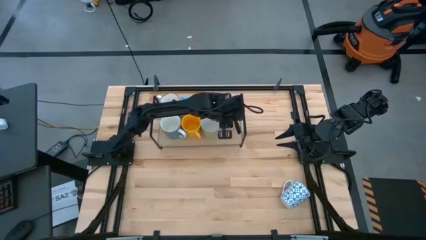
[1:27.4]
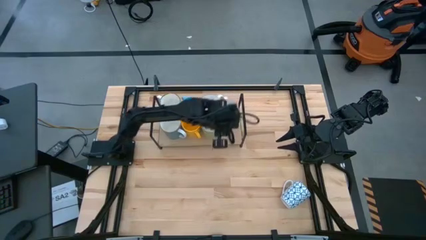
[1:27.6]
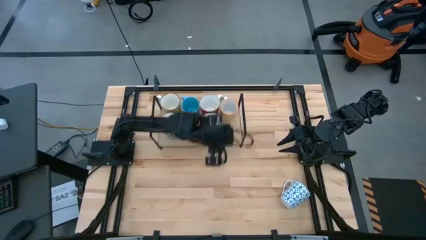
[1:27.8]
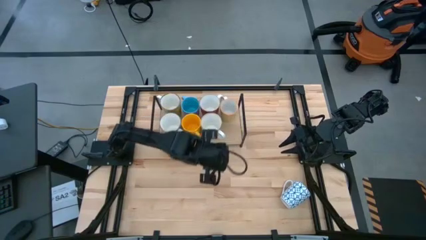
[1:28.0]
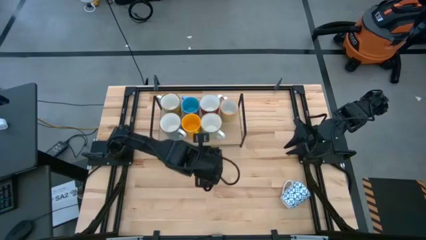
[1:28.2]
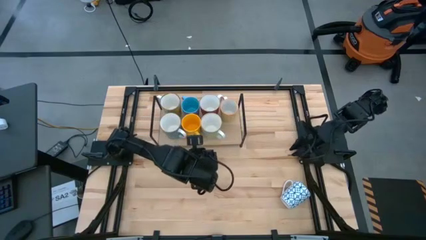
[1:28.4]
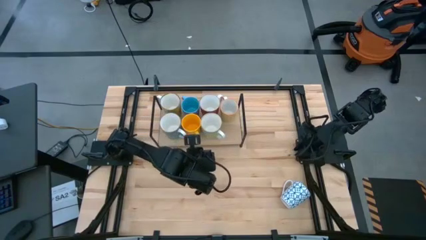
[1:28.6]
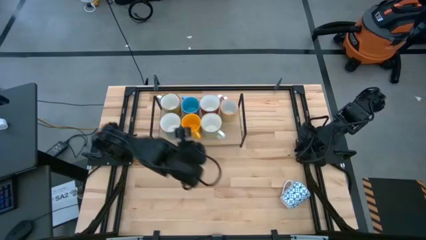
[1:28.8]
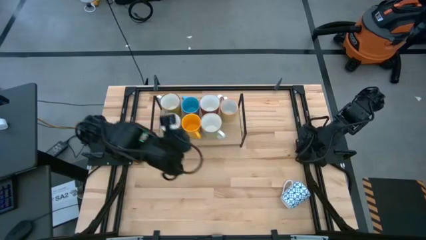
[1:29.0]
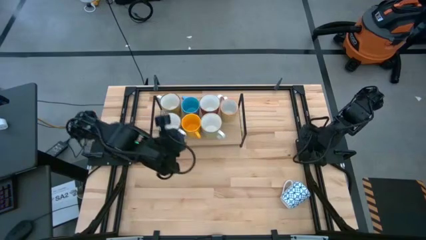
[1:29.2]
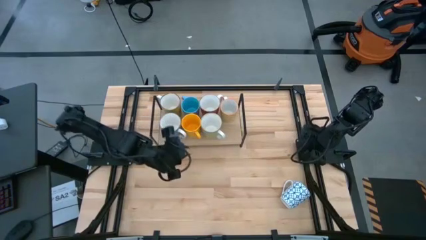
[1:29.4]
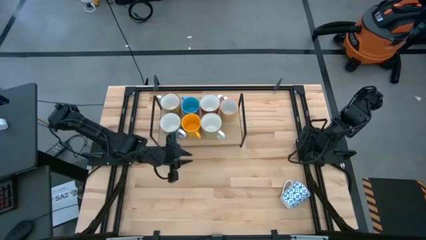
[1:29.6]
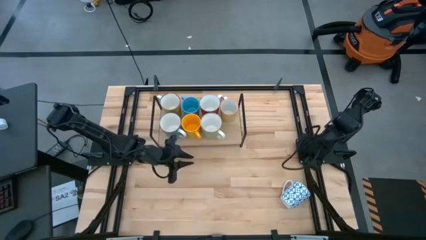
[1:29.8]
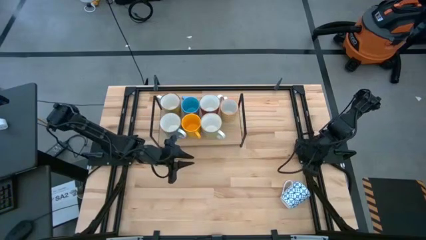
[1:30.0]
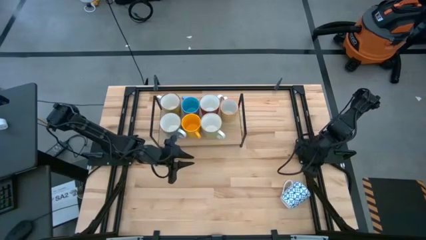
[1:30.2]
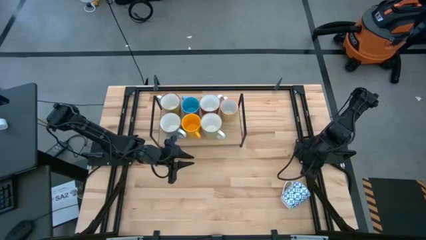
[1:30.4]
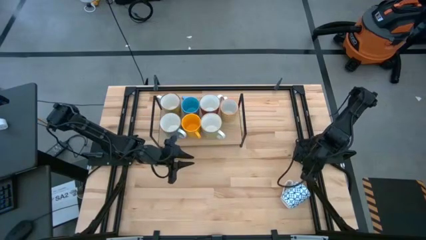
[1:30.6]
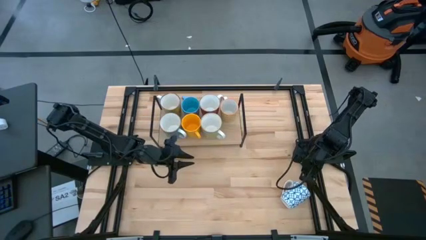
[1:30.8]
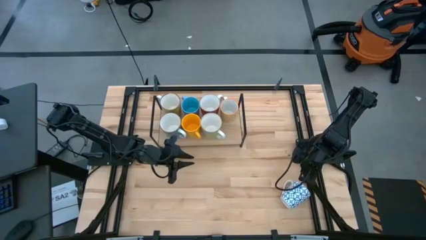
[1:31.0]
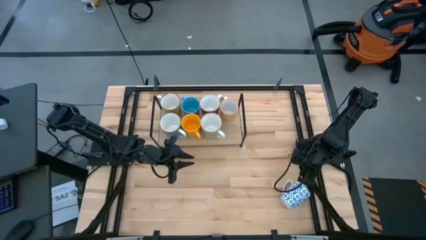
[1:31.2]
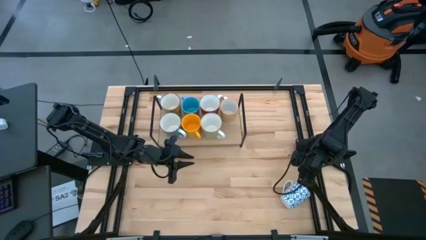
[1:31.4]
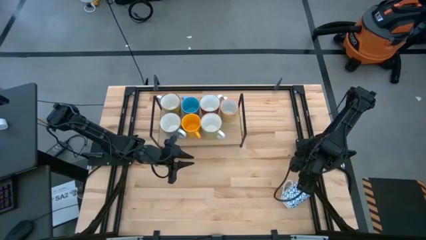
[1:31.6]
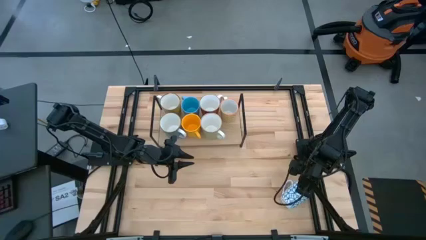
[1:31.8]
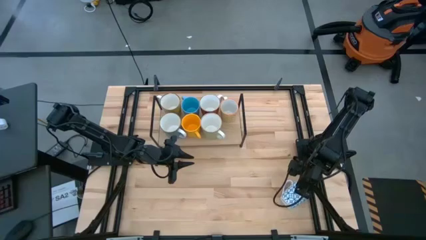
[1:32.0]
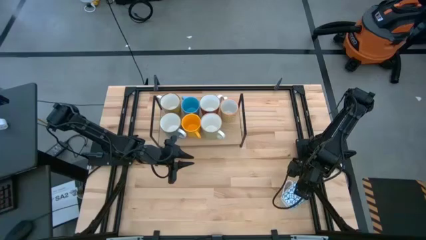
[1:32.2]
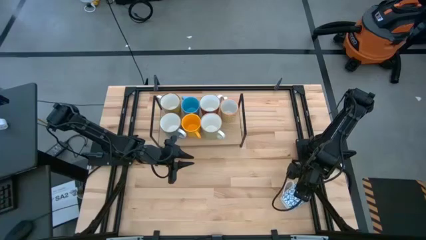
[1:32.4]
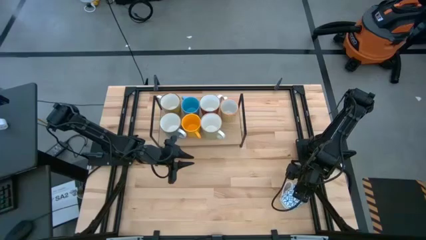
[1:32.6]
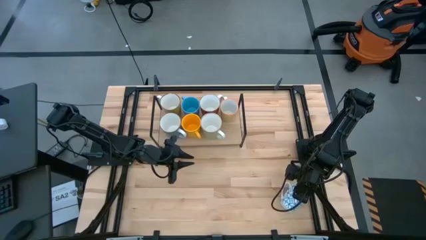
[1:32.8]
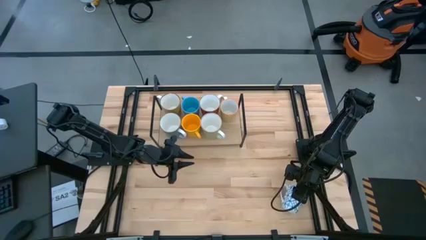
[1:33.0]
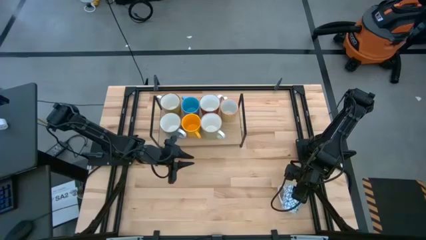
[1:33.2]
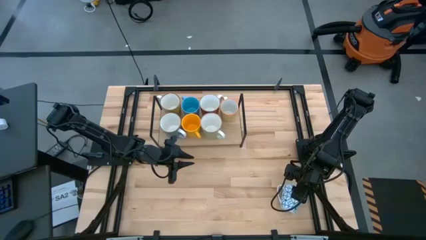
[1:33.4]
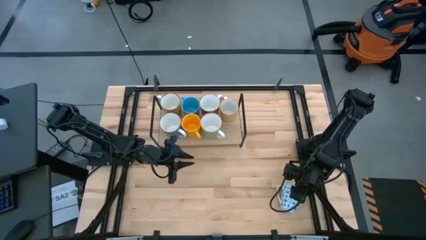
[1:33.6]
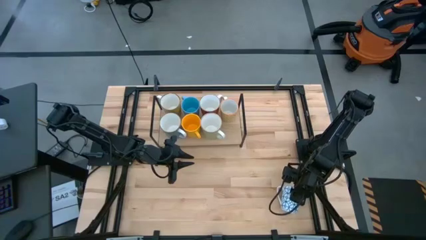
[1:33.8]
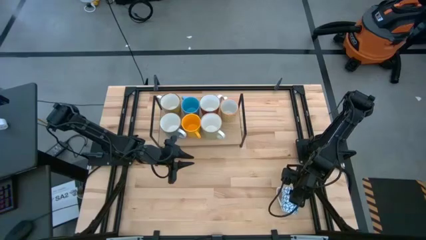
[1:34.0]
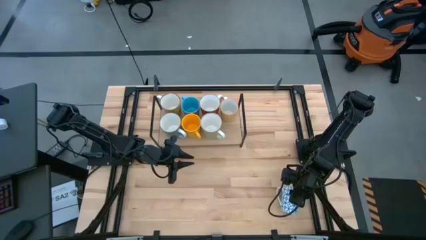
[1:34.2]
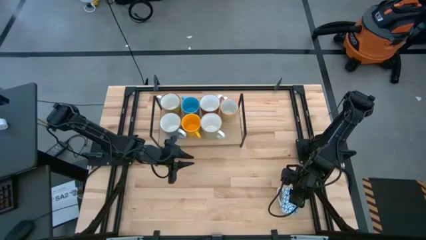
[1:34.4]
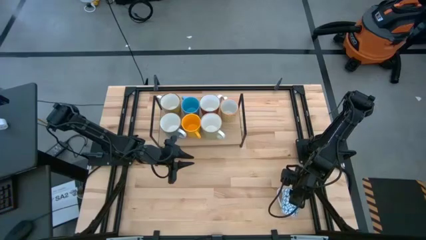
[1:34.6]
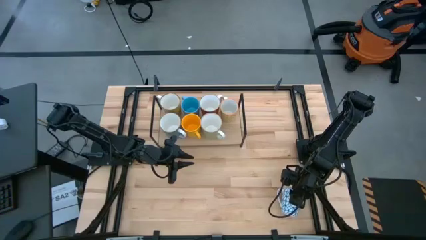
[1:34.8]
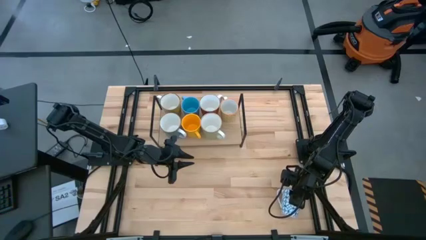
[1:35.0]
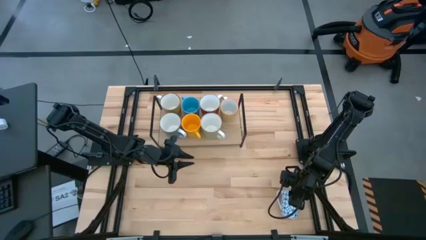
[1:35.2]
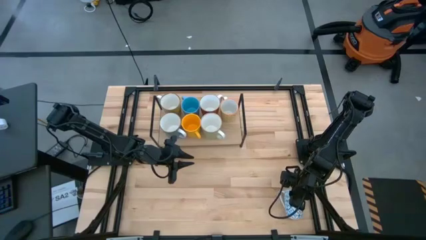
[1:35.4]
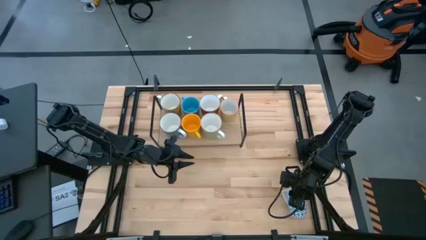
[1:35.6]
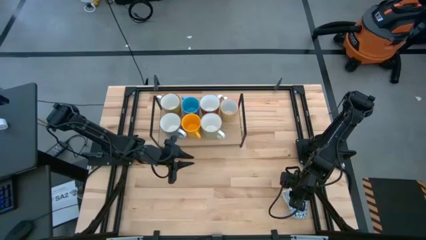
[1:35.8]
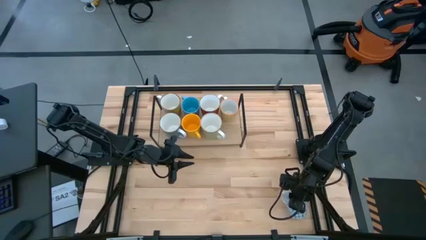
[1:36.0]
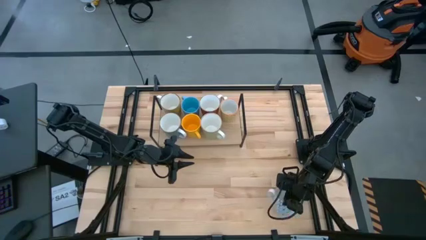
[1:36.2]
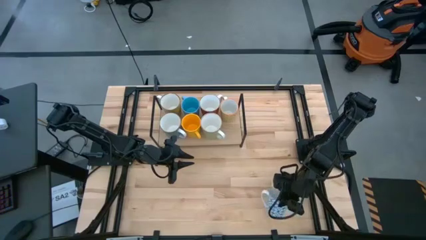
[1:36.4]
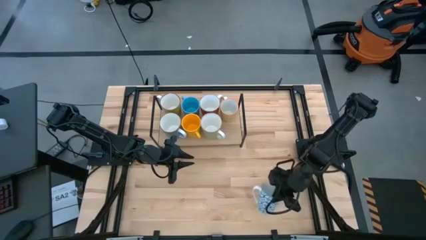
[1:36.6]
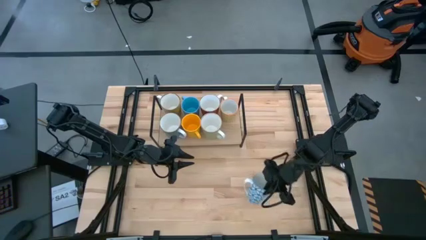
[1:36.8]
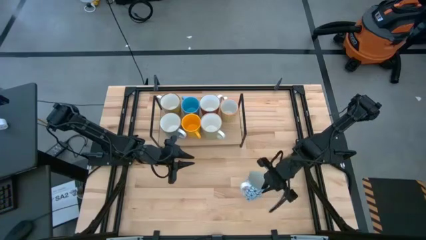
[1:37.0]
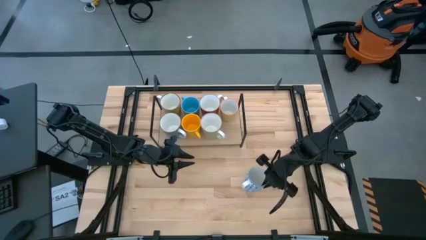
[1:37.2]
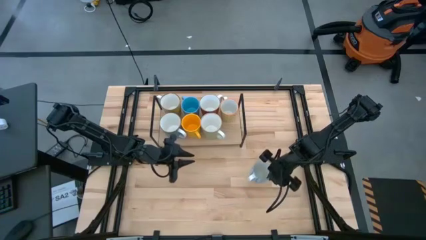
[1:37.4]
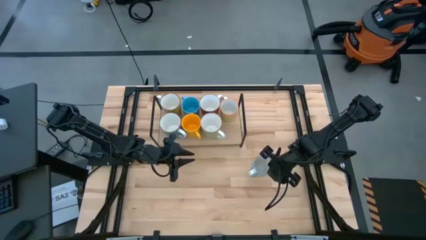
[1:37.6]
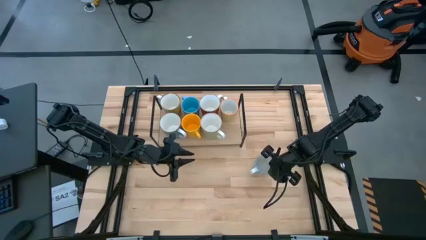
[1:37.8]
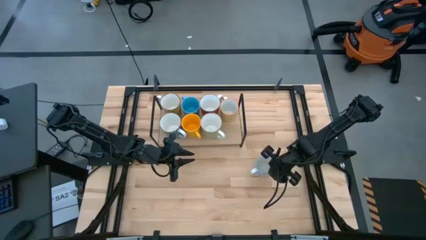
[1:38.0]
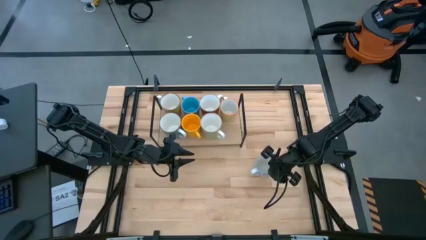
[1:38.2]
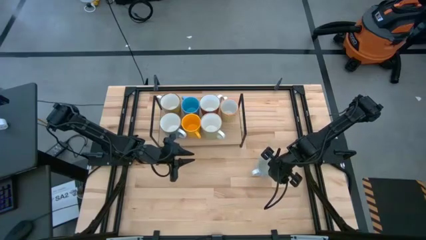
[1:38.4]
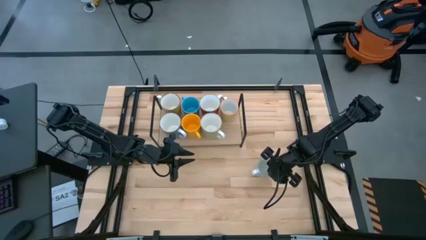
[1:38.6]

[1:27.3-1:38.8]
Task: Place coffee mugs
Put the blue patterned mug on the shelf
